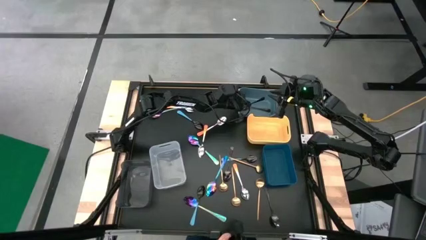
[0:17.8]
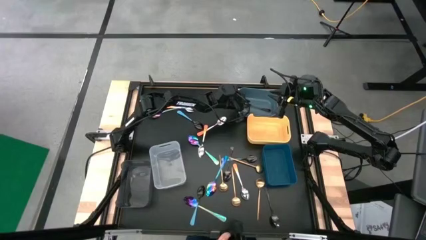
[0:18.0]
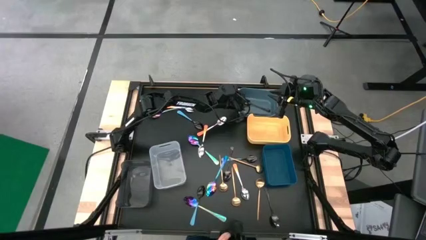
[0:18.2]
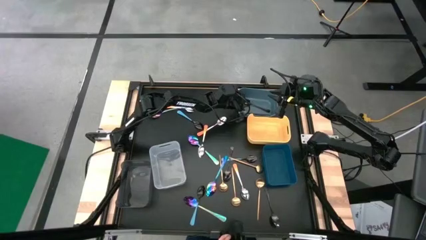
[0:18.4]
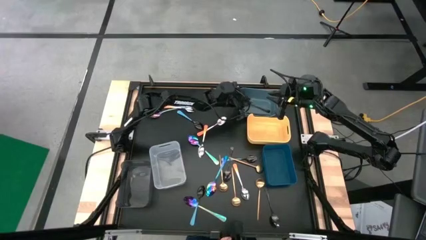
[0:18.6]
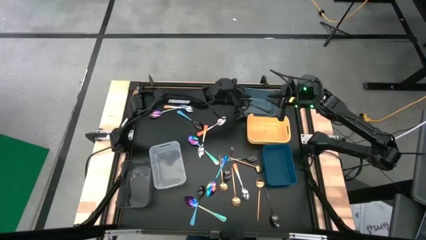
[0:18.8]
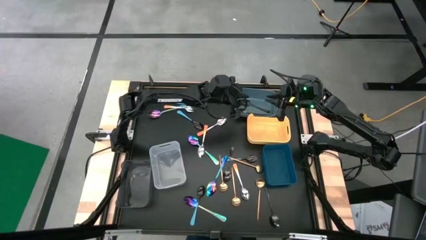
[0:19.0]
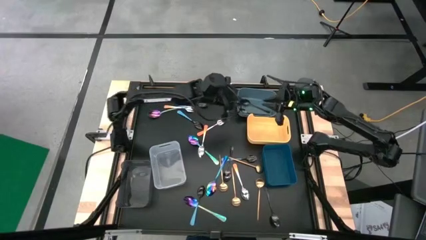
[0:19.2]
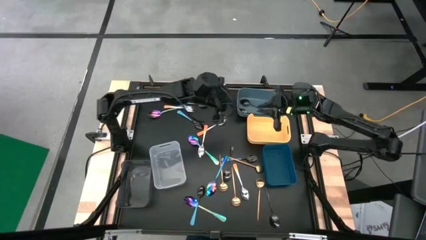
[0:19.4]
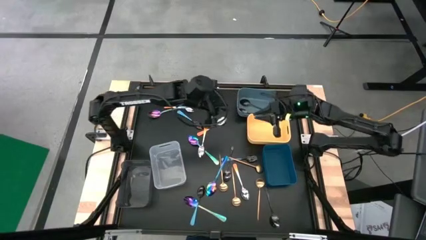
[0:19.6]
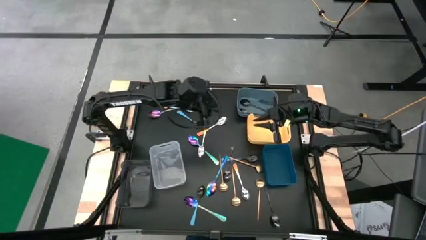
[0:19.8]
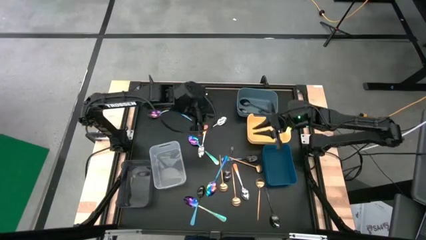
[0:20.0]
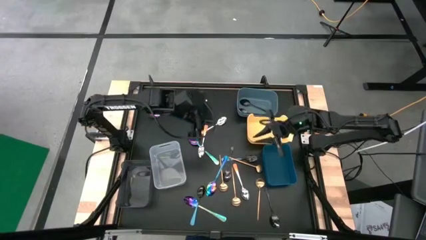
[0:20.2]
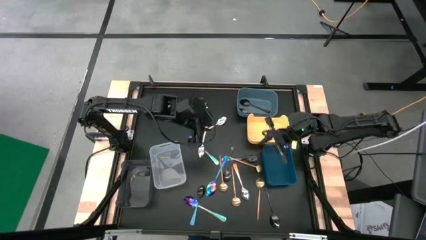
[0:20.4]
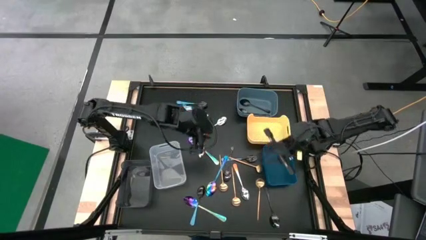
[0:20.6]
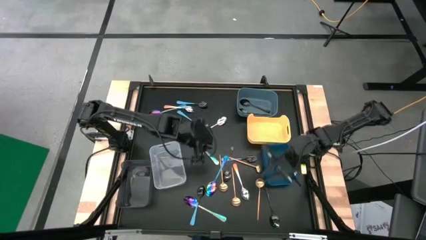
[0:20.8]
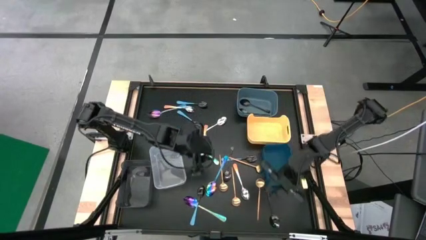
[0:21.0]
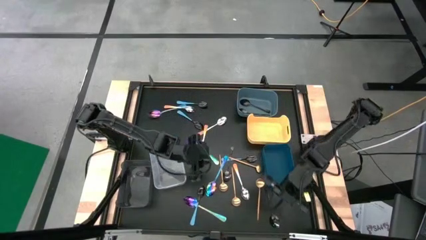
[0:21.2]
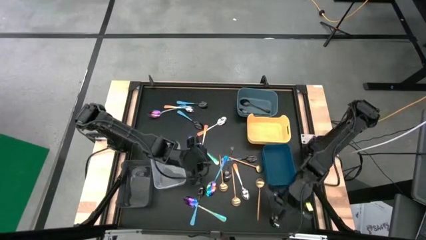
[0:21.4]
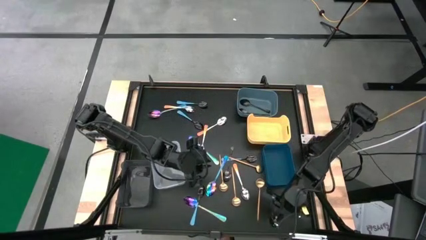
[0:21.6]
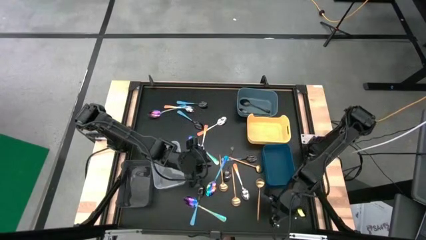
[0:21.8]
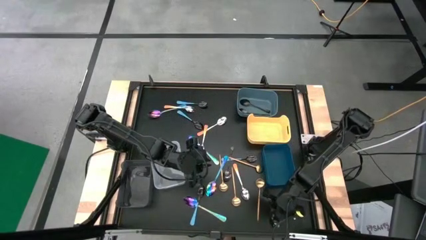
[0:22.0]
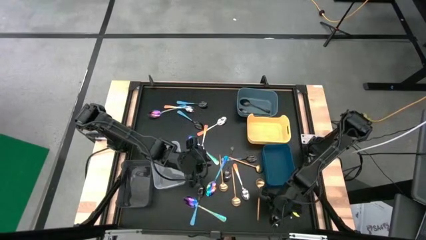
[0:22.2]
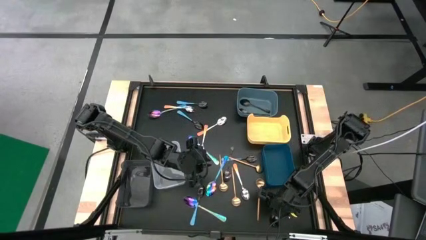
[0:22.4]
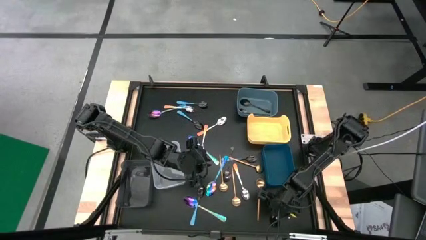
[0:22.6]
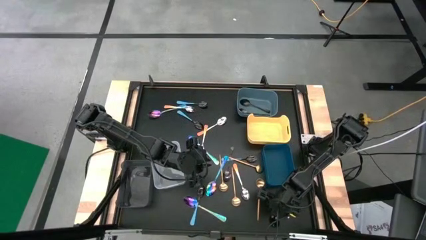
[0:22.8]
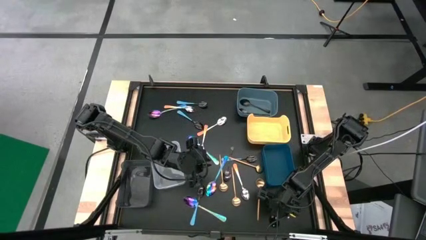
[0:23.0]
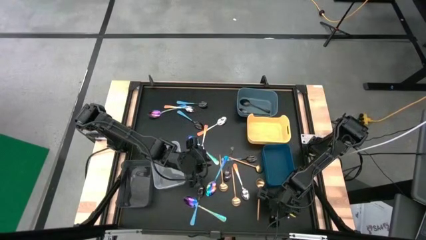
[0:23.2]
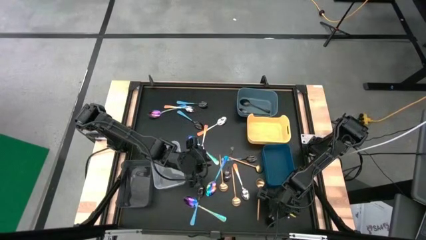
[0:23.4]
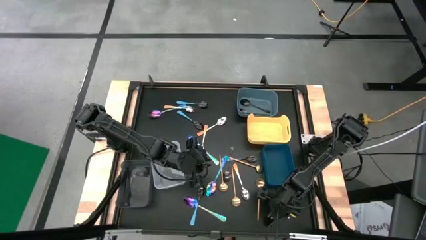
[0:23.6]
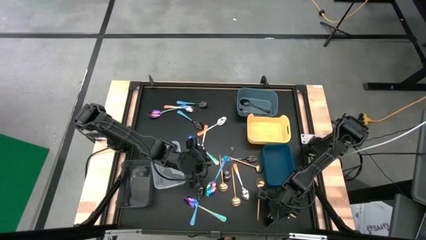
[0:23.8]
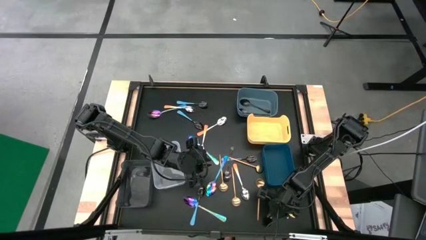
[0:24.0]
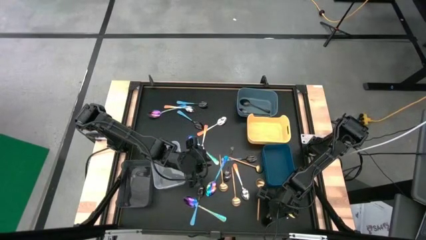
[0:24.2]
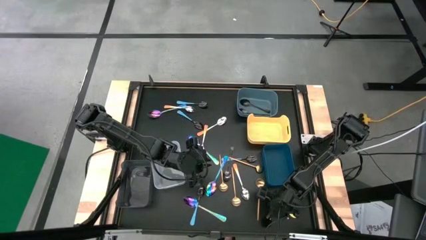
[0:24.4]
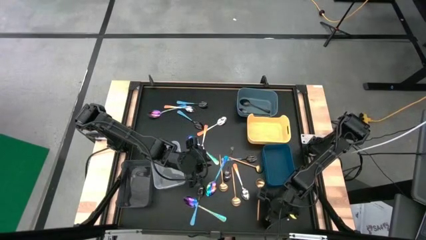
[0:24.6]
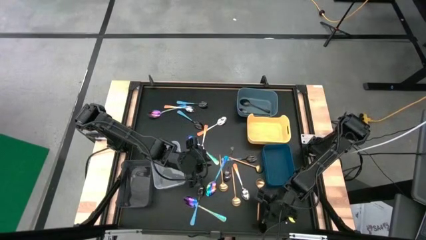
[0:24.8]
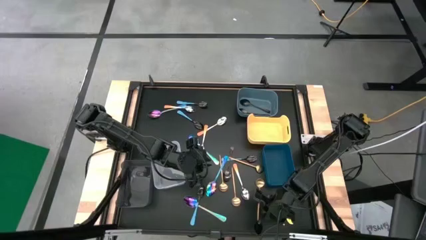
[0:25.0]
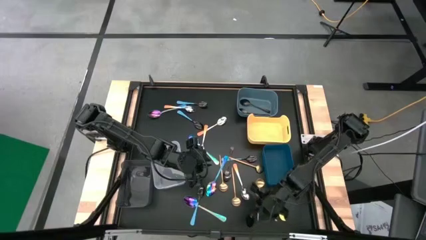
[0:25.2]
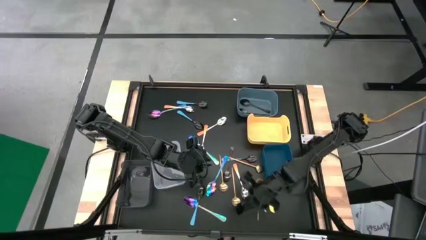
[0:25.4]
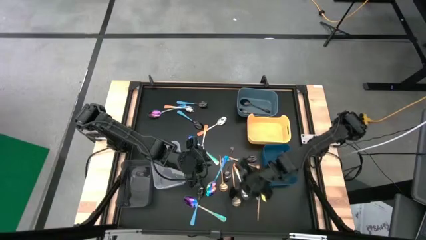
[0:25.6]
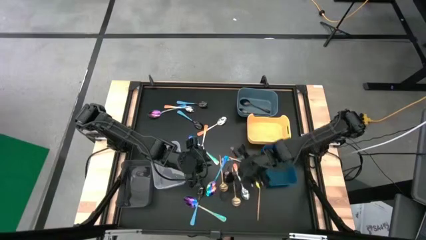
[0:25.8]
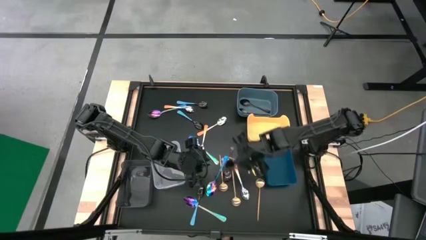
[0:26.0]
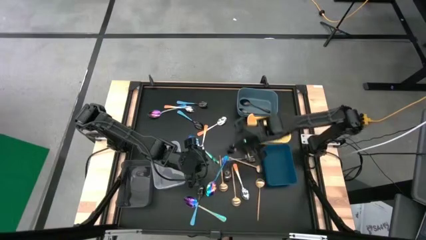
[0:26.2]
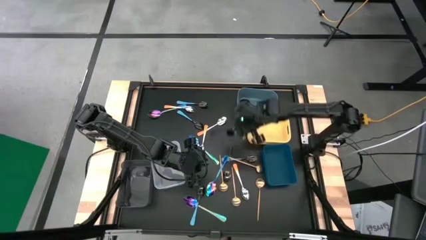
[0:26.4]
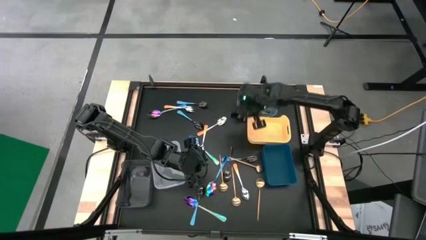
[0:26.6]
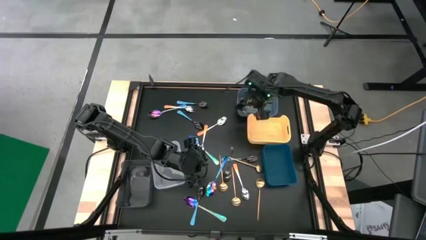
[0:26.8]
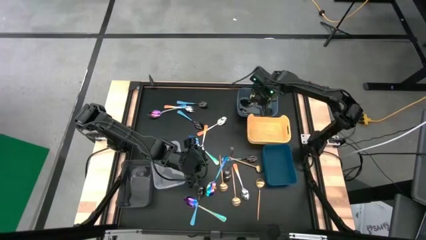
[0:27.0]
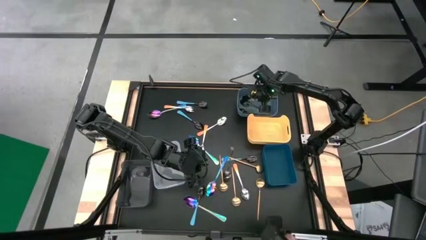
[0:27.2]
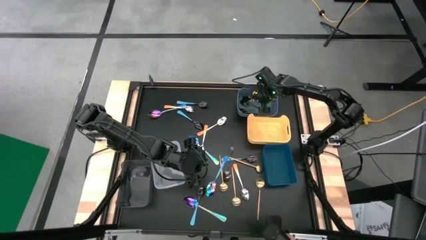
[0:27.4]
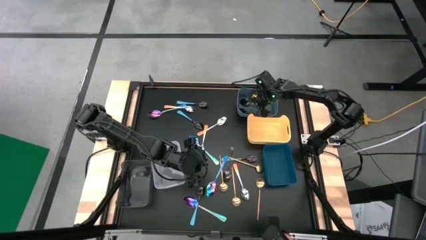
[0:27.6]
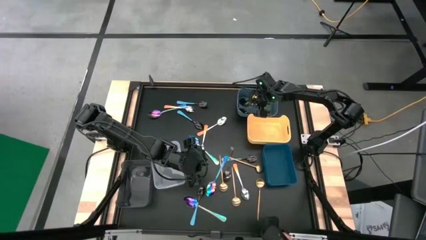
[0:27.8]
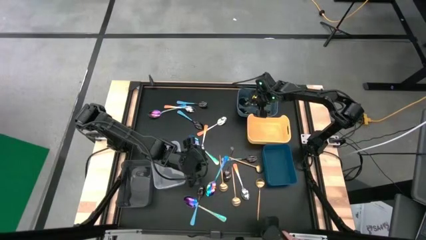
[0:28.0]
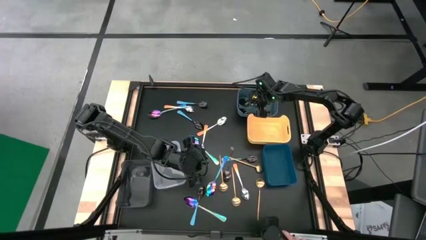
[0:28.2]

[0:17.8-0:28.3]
Task: Sort silverware by color (type)
Put the black spoon into the light blue bin
